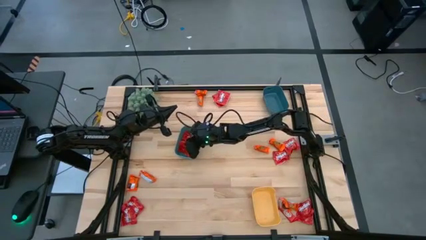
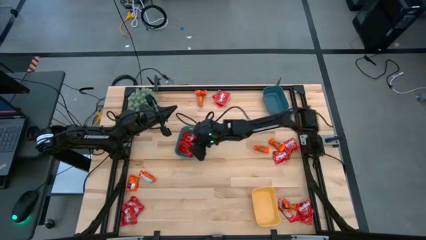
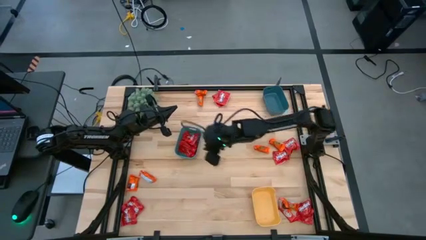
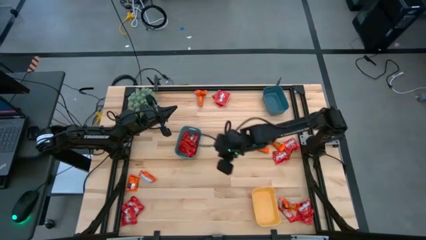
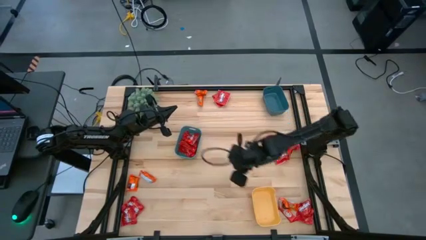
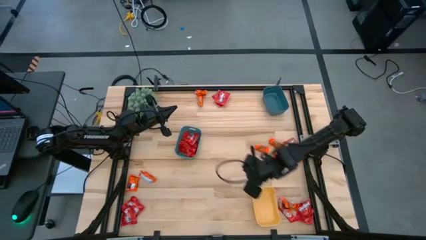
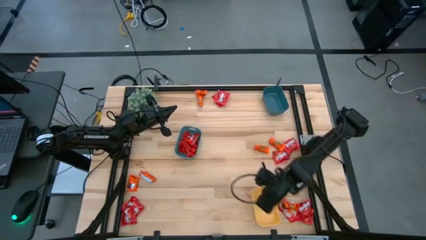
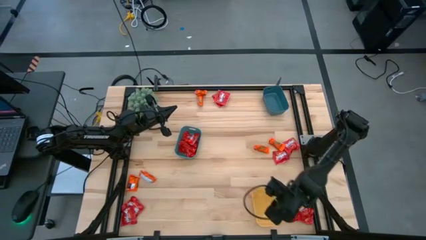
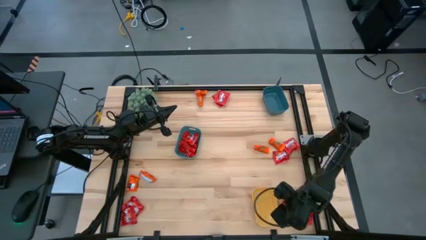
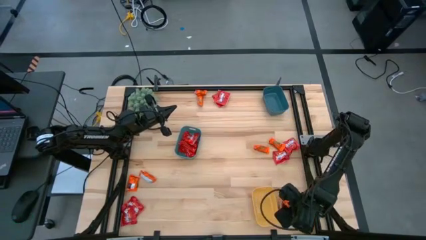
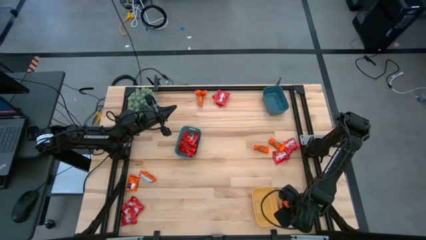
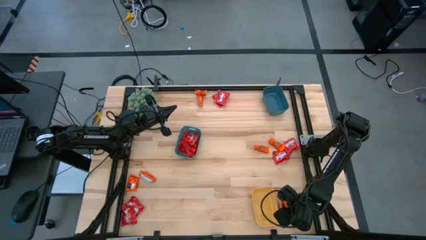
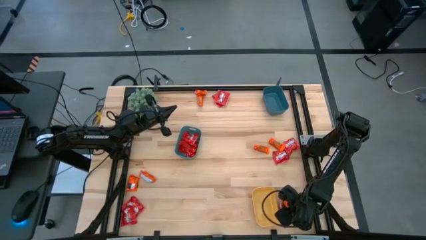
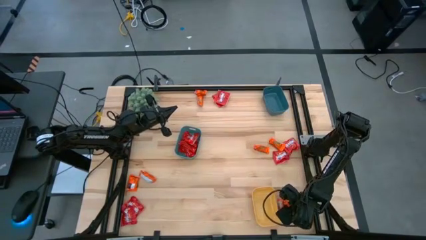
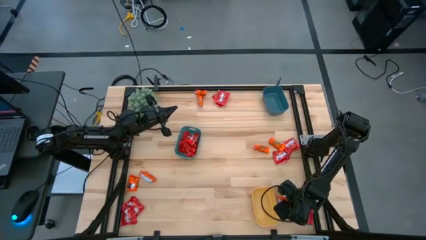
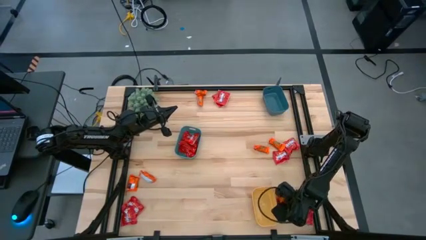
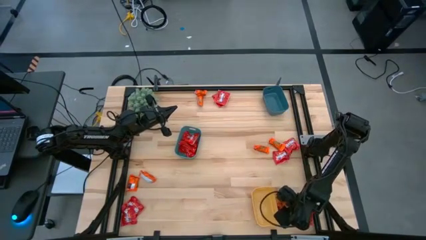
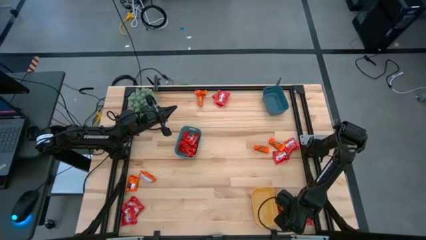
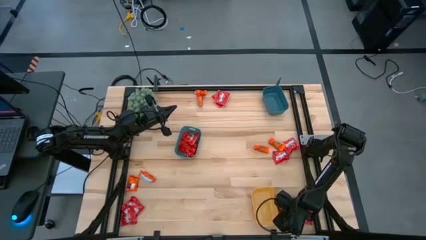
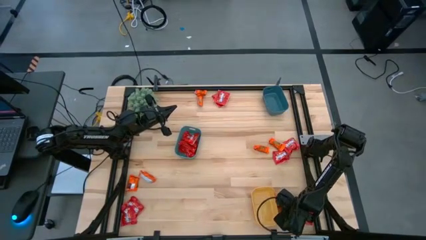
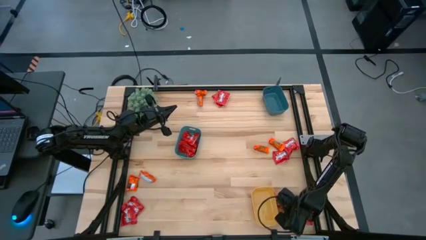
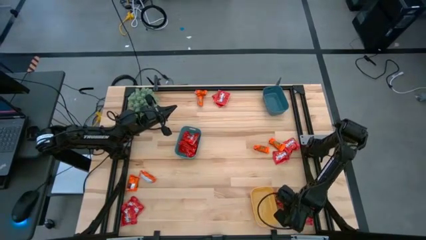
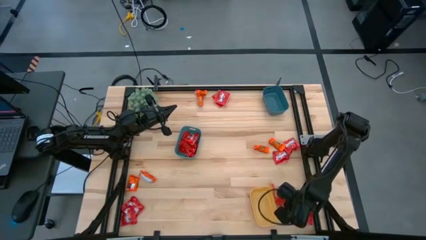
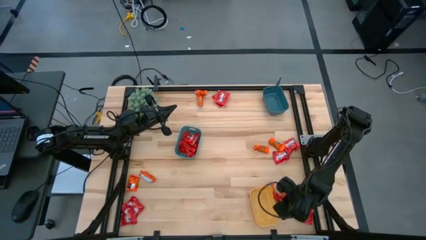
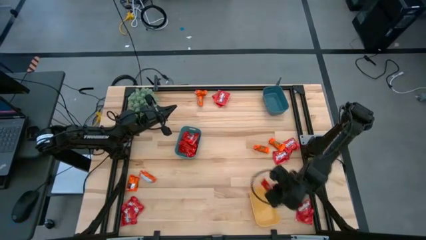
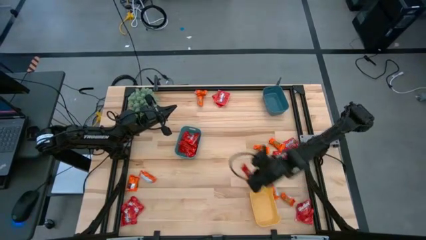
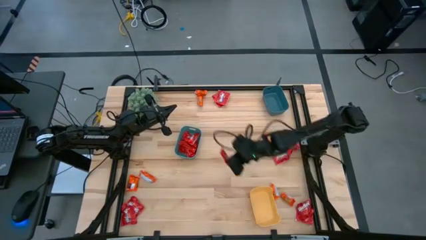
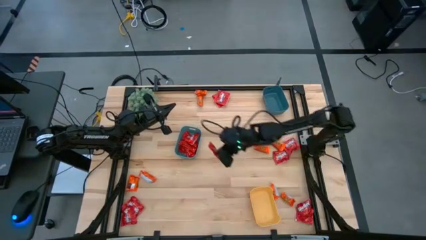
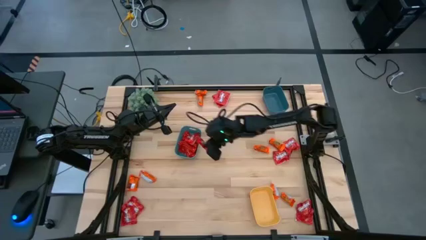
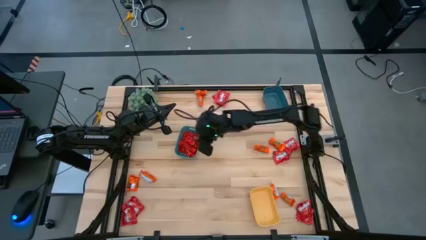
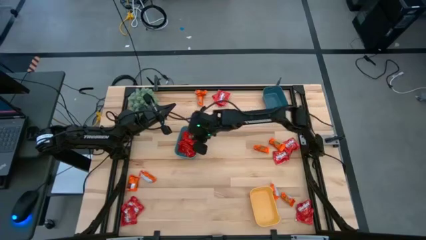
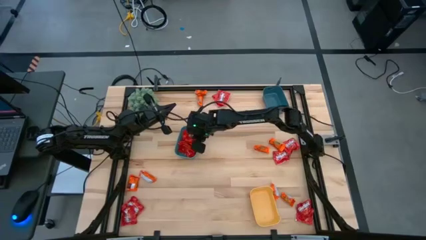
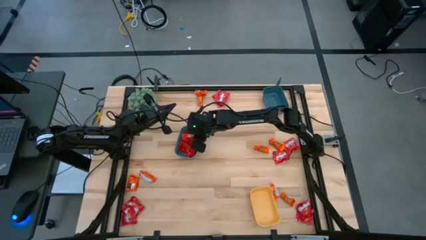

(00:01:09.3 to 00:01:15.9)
Task: Sort candy
Put the red candy into the green bin

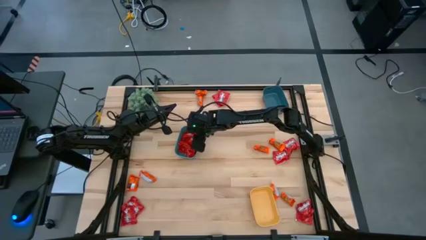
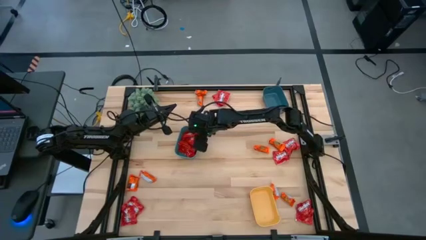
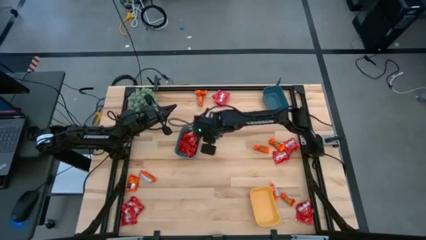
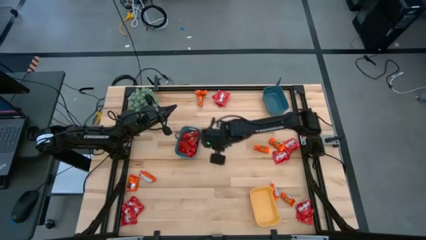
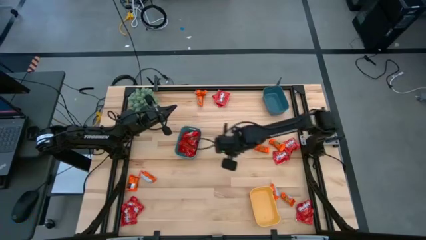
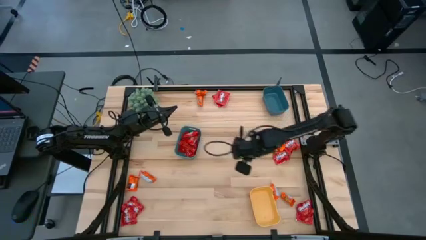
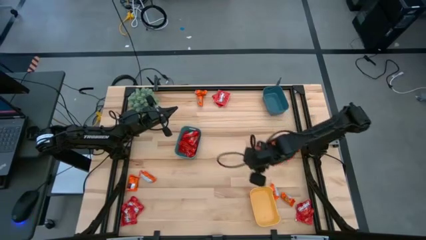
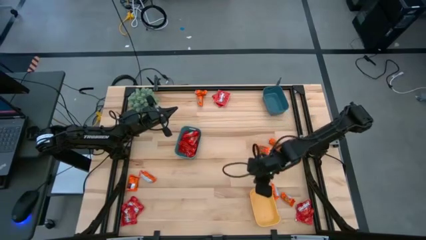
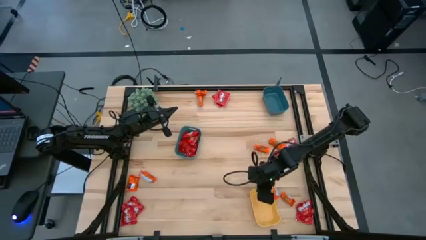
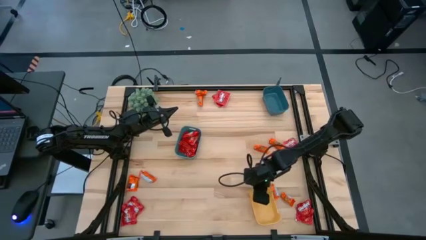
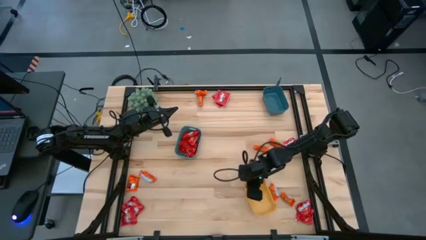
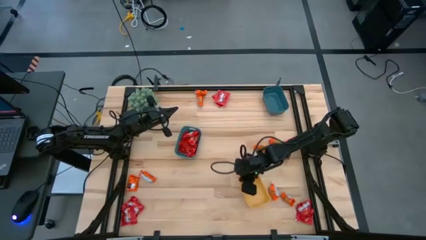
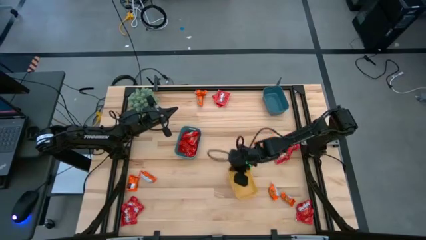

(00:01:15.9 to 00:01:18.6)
Move the yellow bin from the bottom right to the center

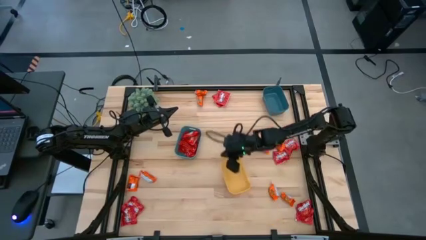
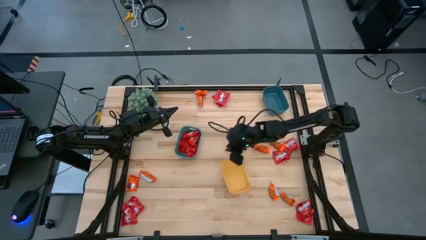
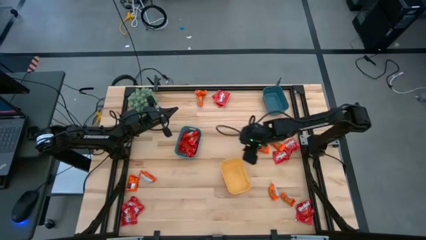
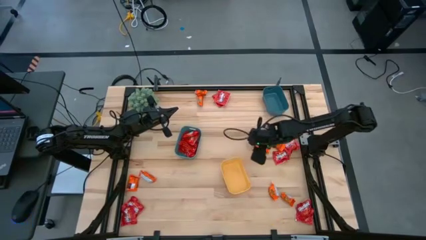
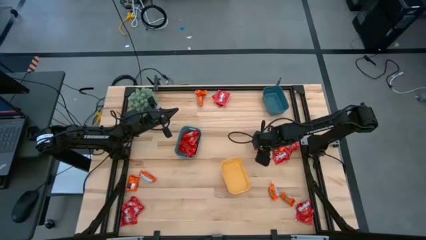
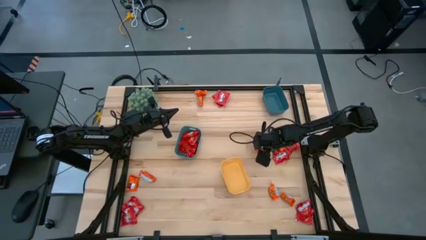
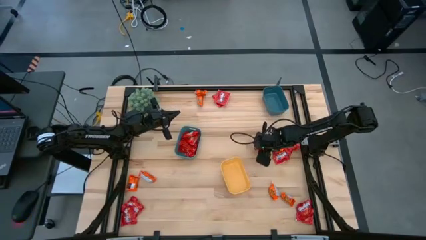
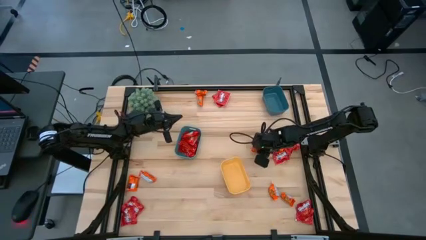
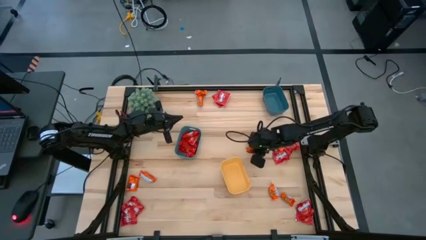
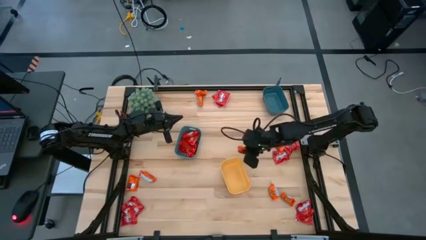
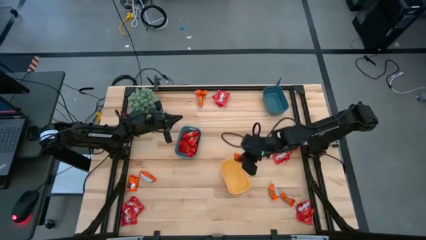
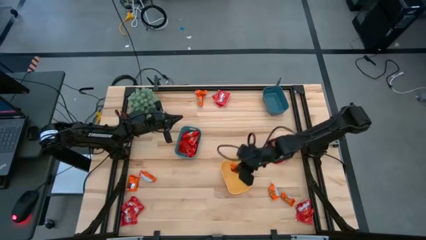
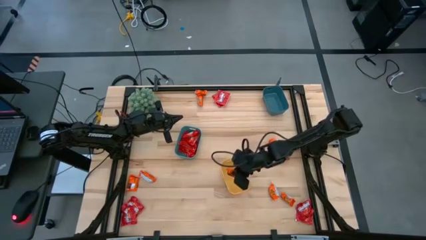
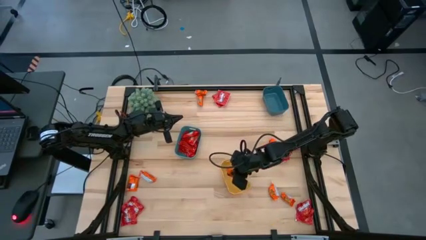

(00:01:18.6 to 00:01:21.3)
Put the orange candy into the yellow bin

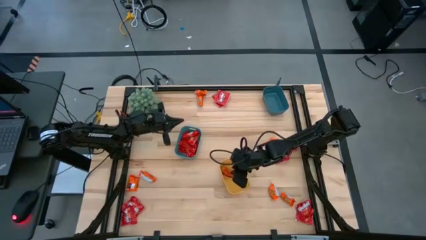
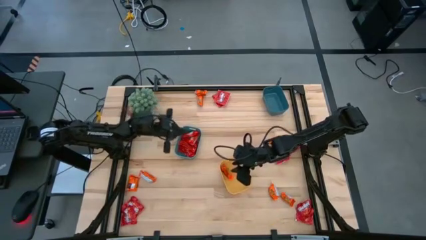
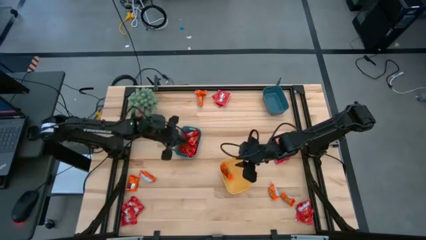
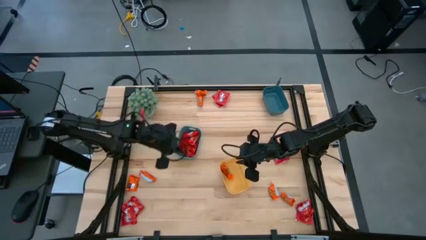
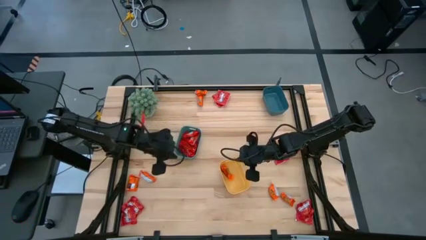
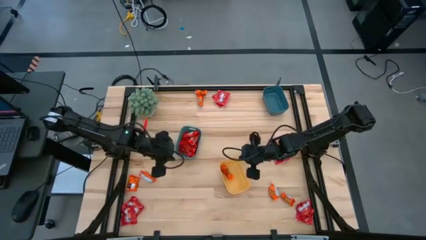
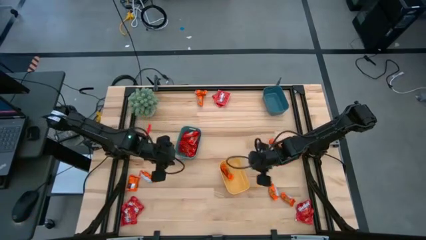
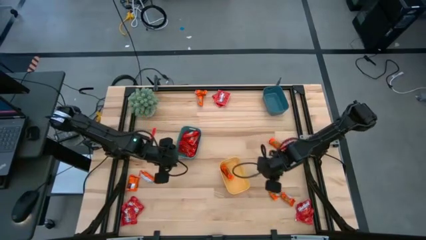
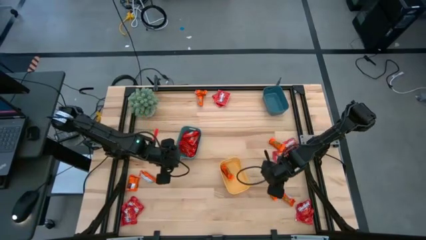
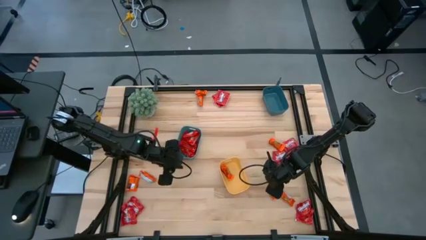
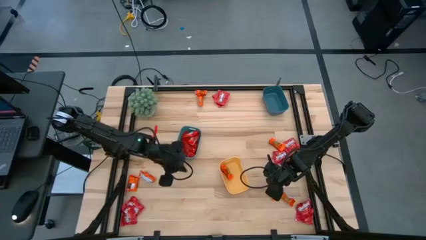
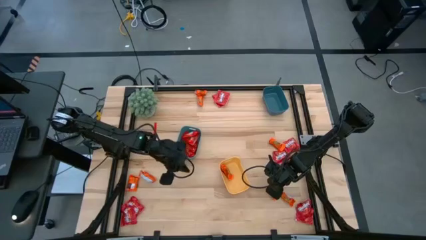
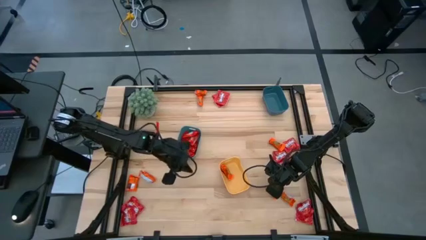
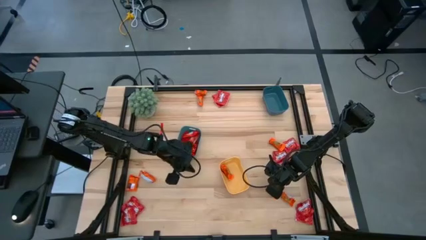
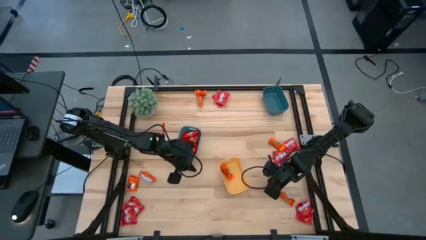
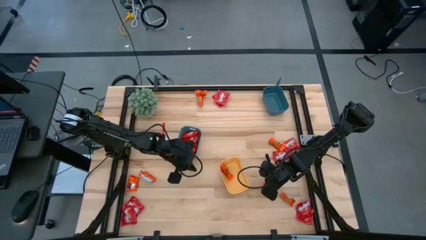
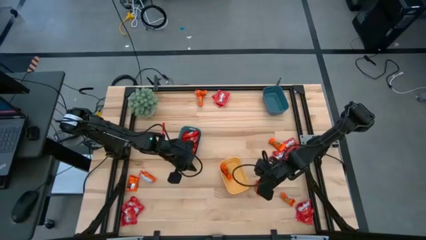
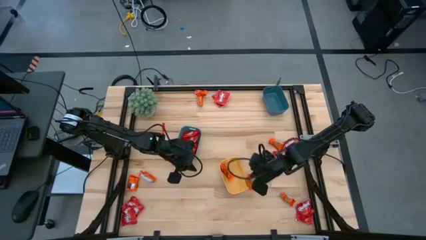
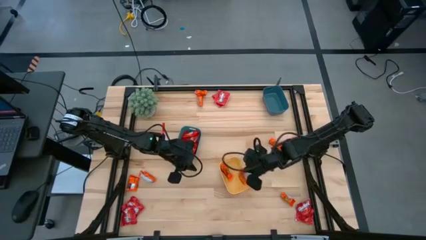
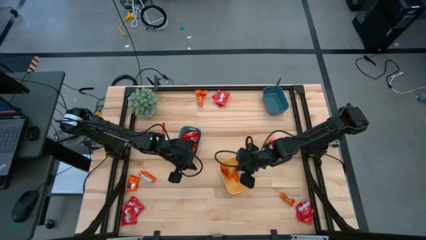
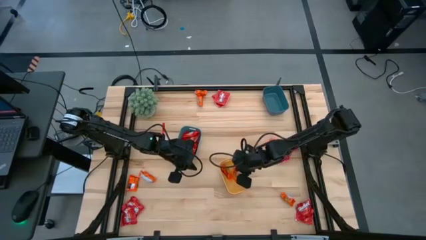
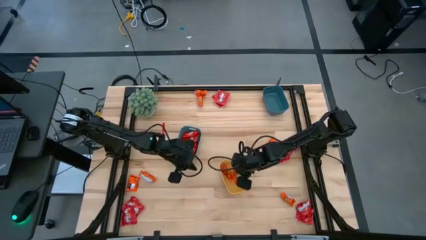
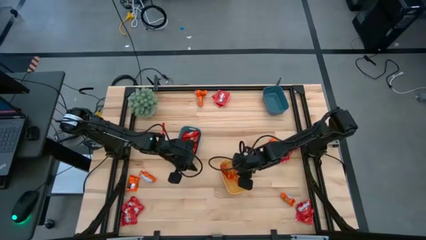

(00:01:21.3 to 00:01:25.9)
Put the orange candy into the yellow bin

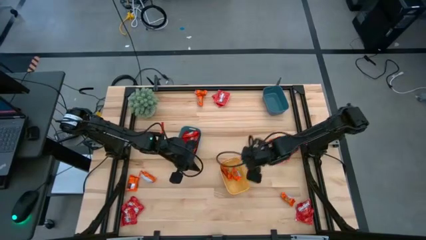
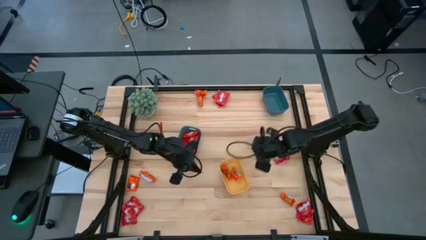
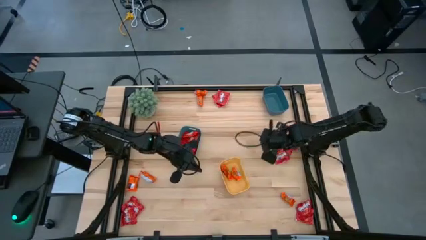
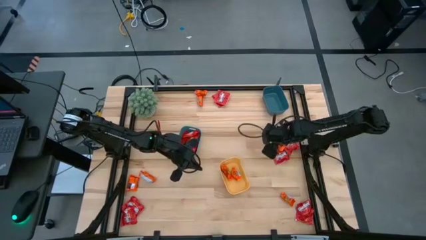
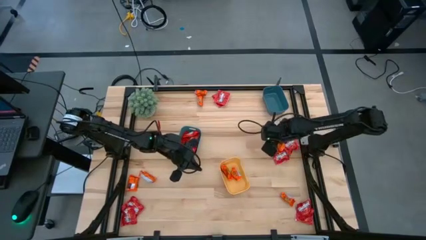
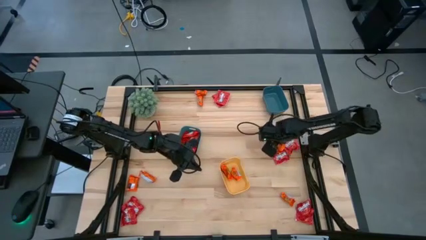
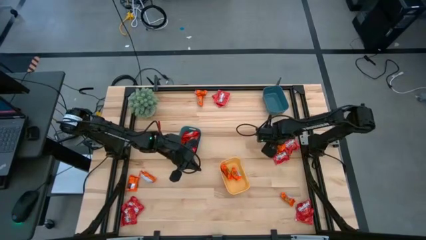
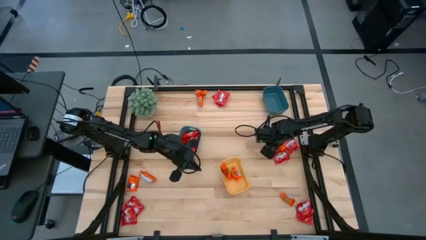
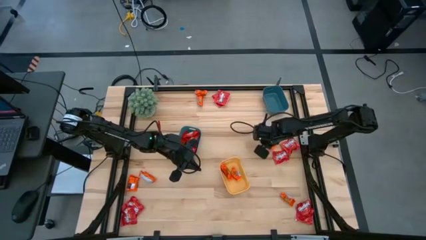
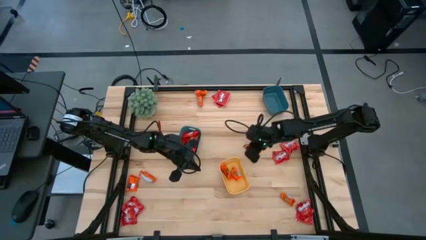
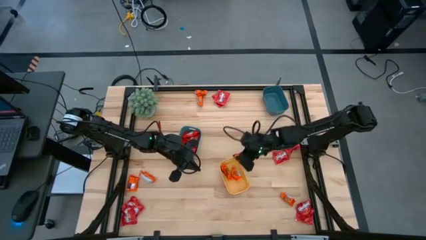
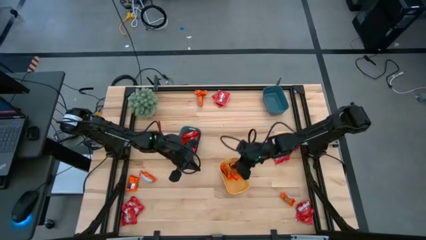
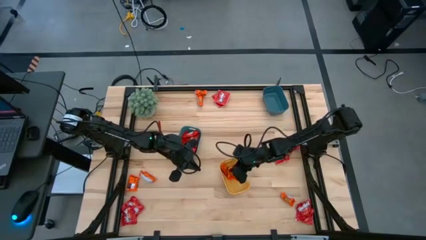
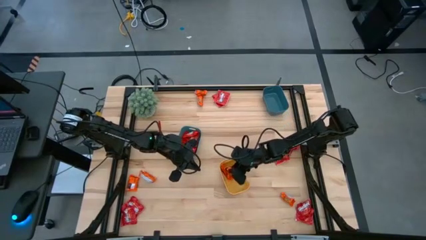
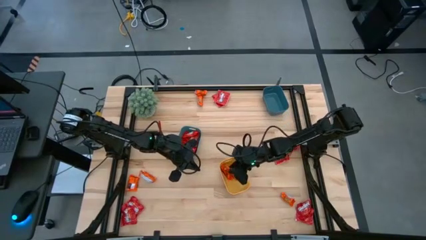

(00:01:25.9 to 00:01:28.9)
Put the orange candy into the yellow bin
